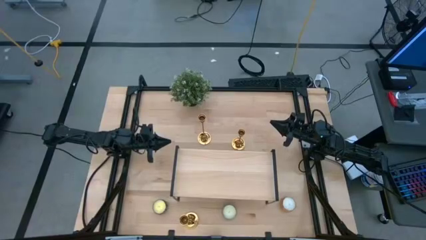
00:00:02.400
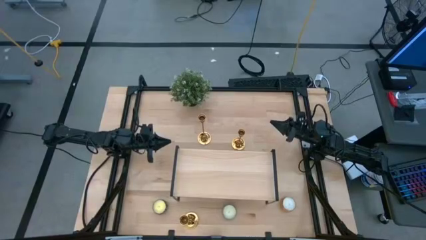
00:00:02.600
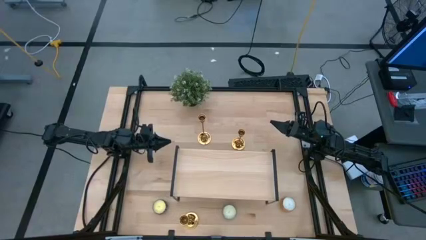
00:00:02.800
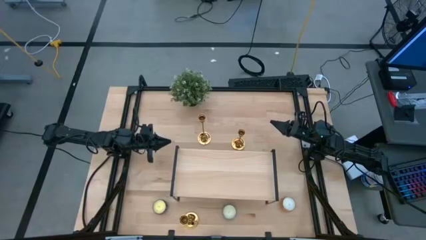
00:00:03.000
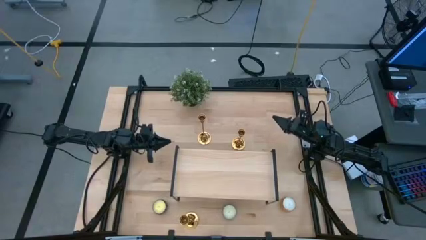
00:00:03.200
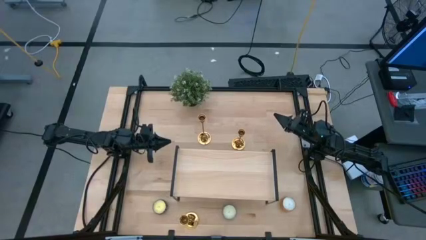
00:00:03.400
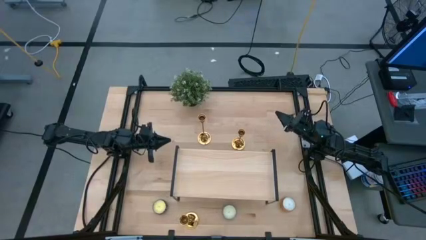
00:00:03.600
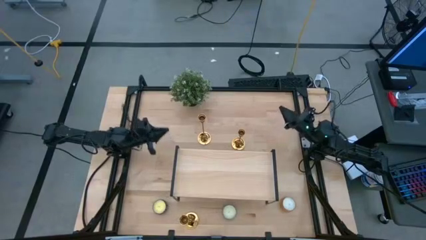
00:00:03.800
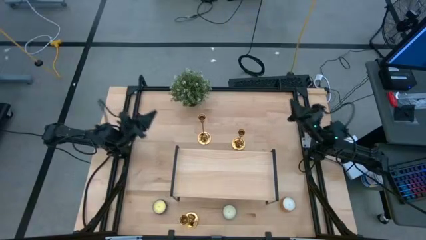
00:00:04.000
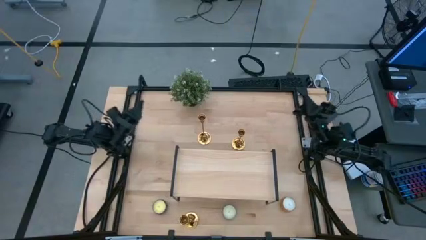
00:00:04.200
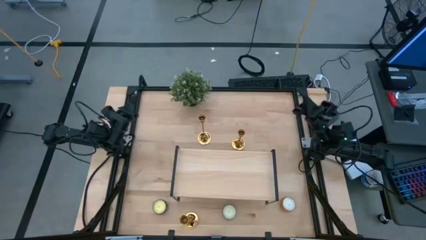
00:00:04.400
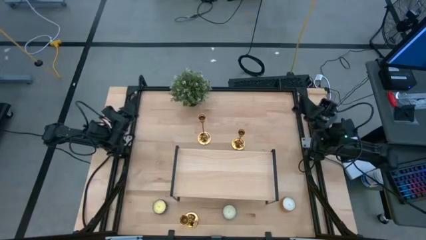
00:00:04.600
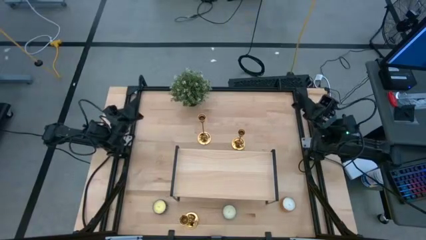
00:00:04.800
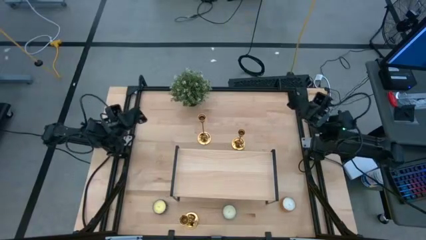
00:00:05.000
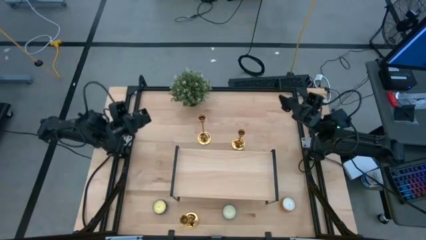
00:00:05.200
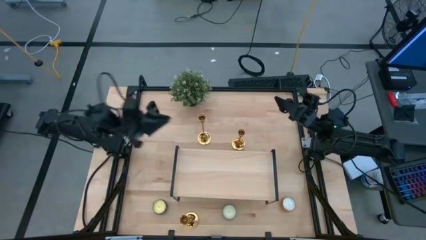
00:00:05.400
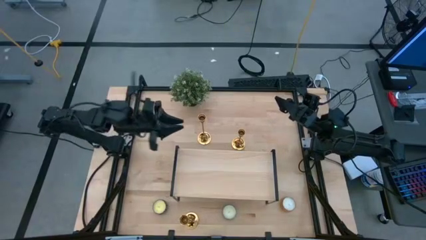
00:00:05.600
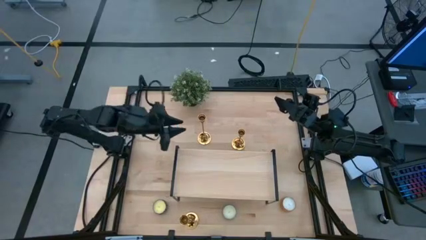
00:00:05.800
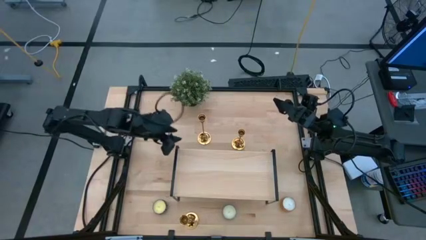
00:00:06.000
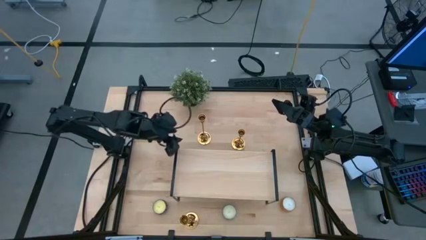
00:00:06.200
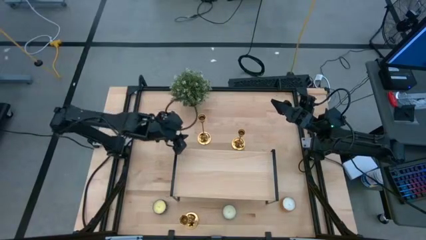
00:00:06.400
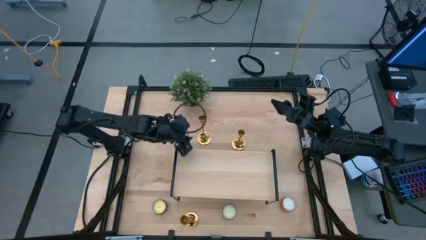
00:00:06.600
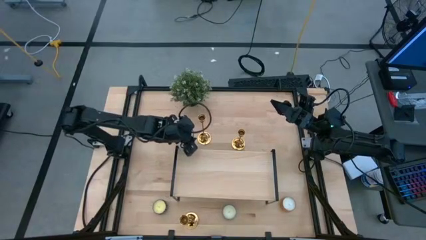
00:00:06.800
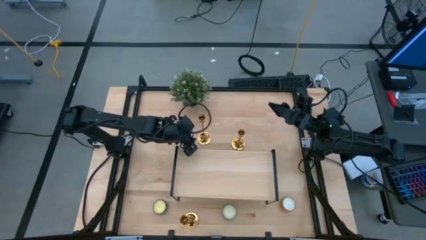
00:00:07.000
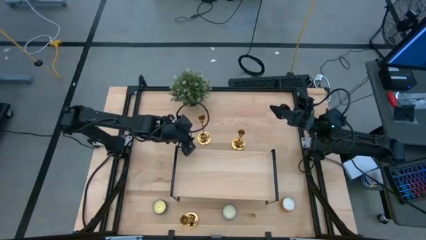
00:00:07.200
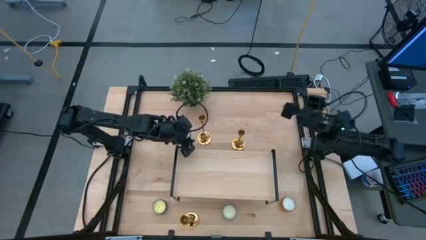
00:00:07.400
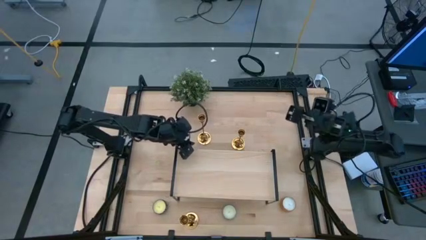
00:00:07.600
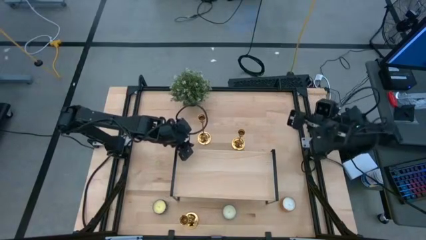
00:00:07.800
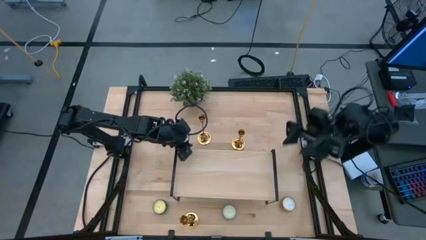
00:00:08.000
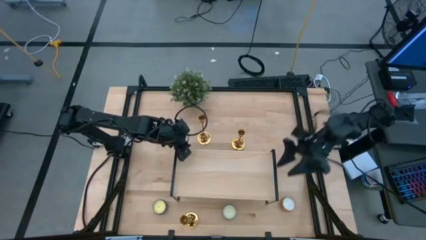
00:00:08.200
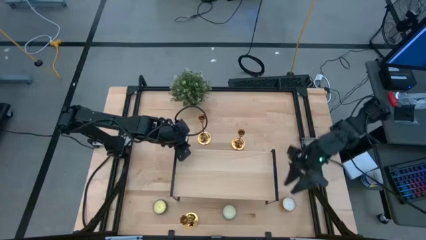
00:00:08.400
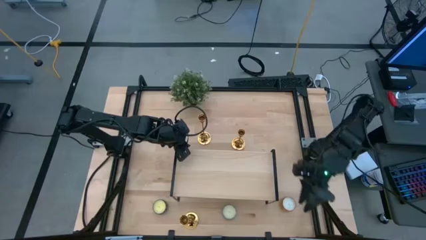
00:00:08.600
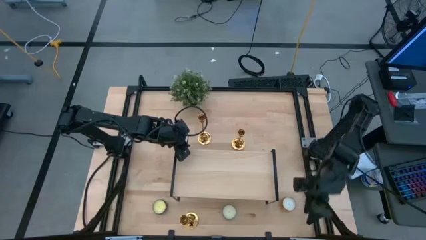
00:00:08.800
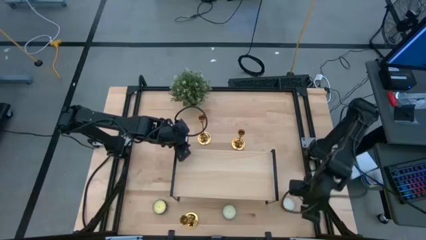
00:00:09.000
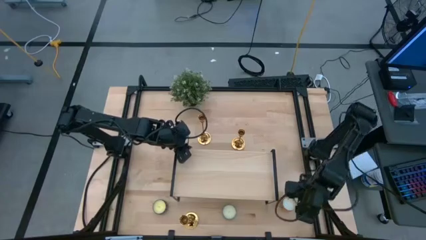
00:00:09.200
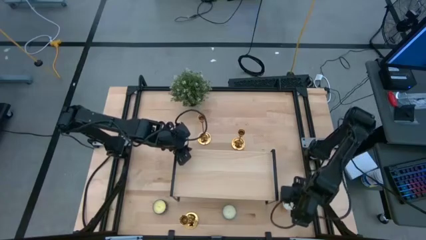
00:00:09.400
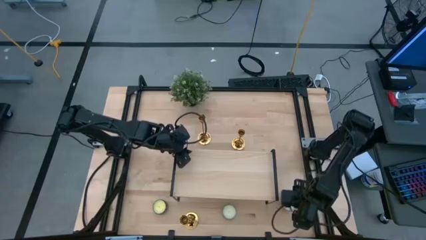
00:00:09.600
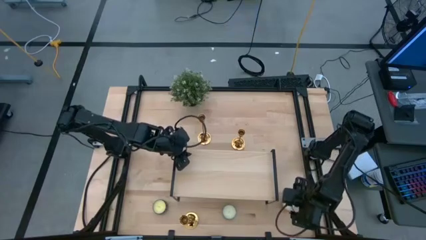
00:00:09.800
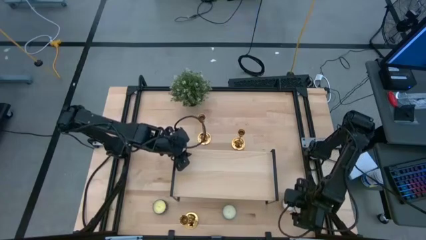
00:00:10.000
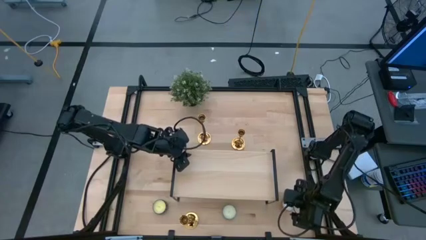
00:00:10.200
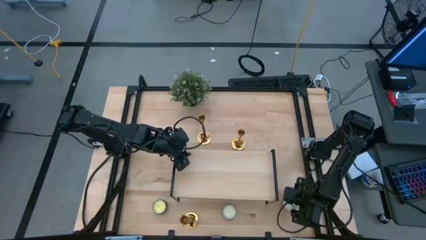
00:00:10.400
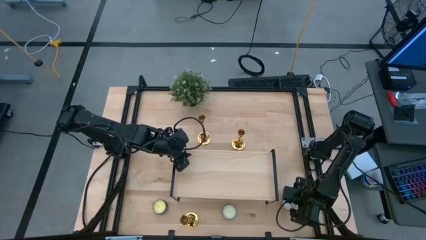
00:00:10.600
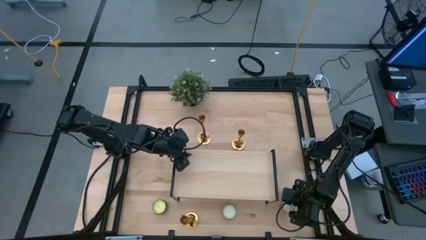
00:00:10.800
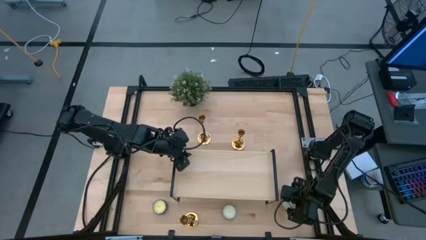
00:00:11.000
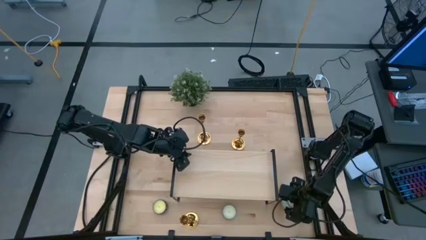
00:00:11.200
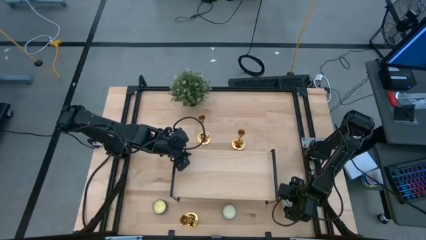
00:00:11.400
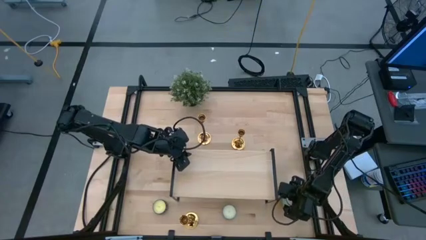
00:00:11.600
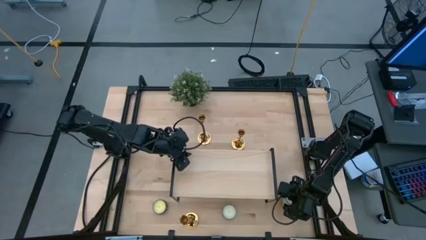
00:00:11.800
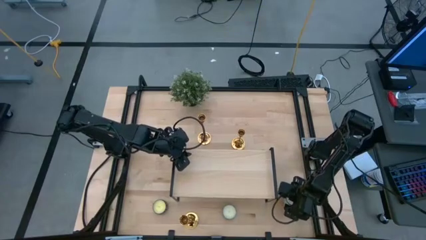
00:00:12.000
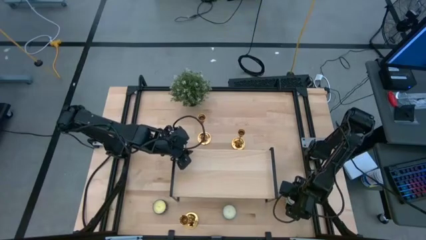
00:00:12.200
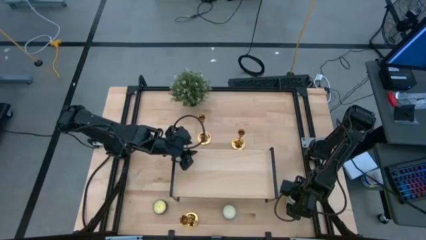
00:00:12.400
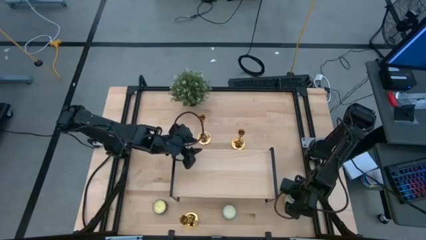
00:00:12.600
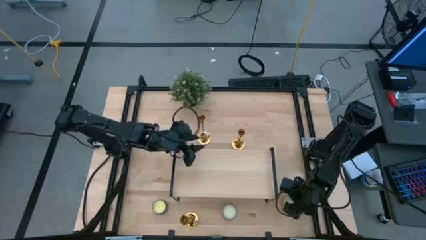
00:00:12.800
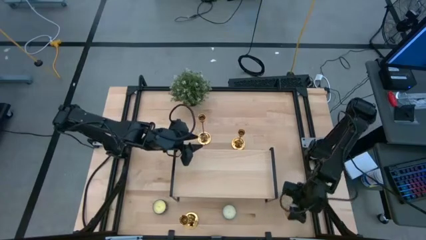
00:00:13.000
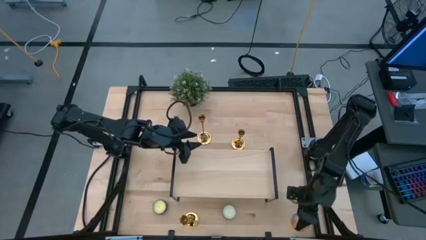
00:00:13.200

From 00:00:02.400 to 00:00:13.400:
Task: Pick & Place candle stick holders
Put the orange scented candle on the shelf
